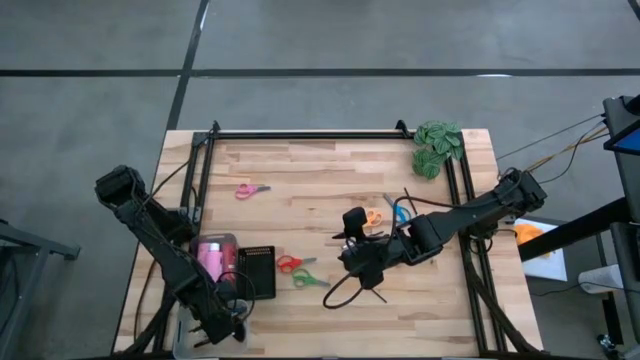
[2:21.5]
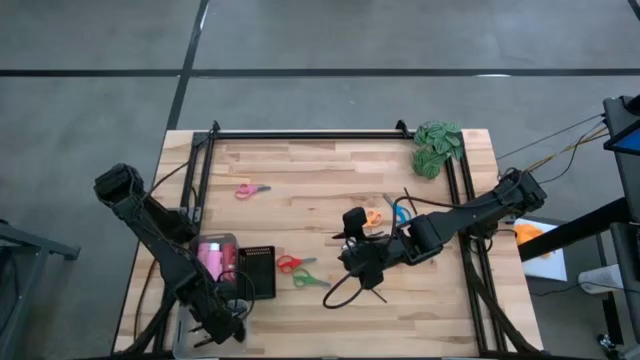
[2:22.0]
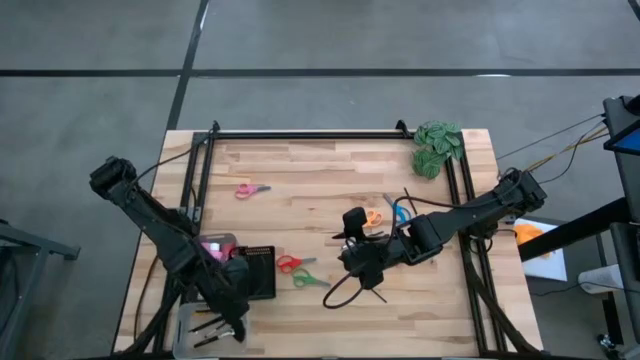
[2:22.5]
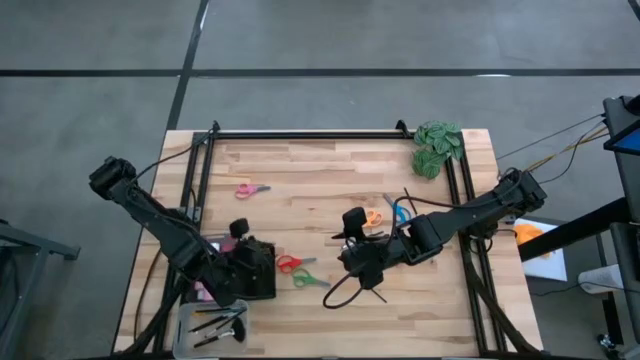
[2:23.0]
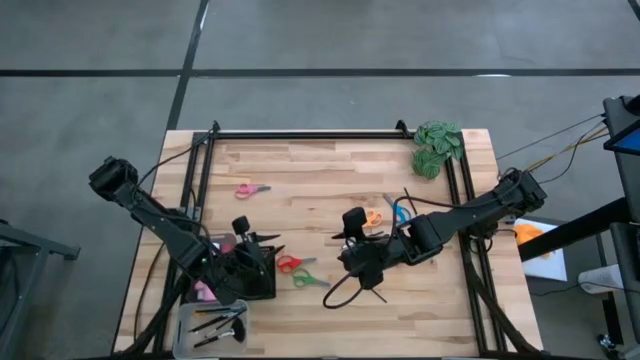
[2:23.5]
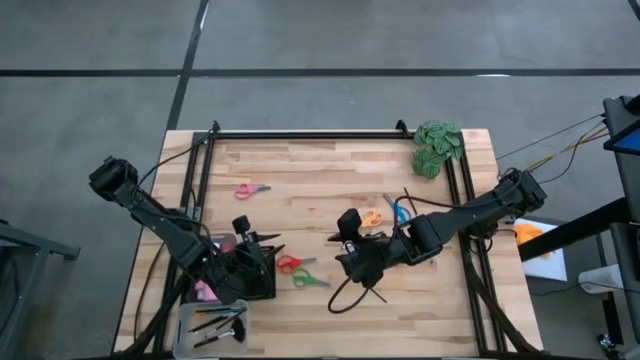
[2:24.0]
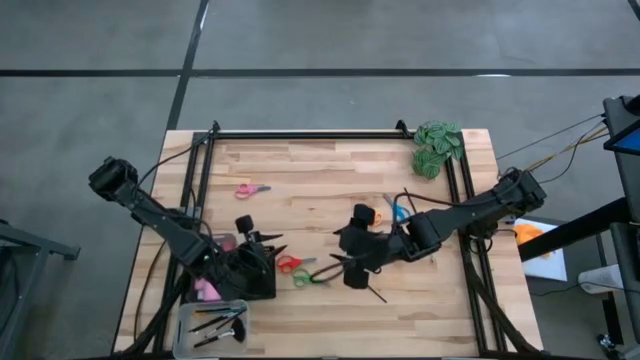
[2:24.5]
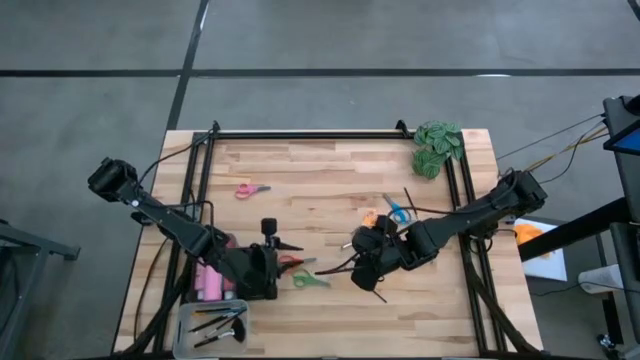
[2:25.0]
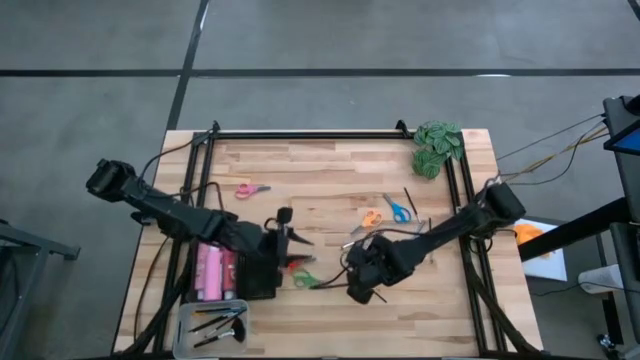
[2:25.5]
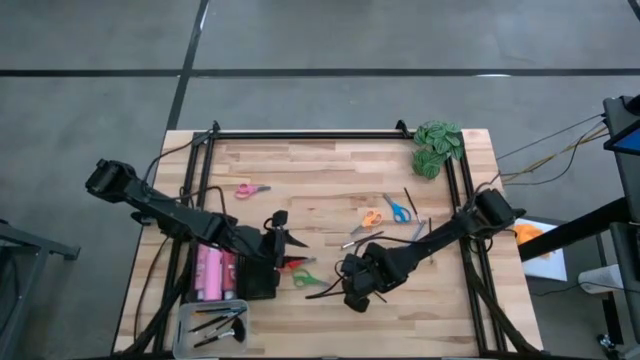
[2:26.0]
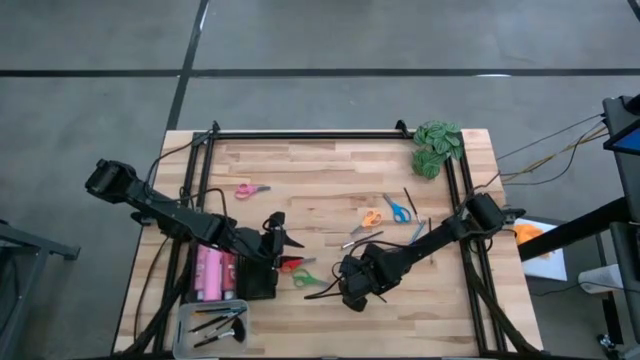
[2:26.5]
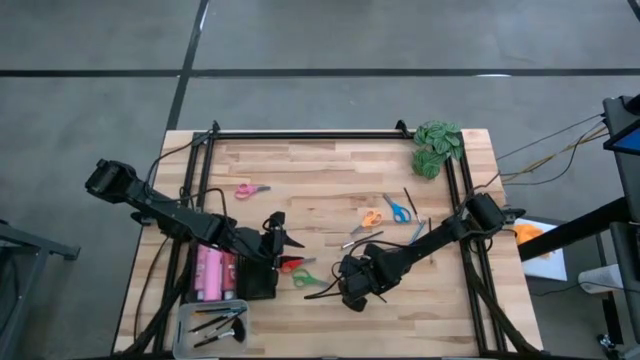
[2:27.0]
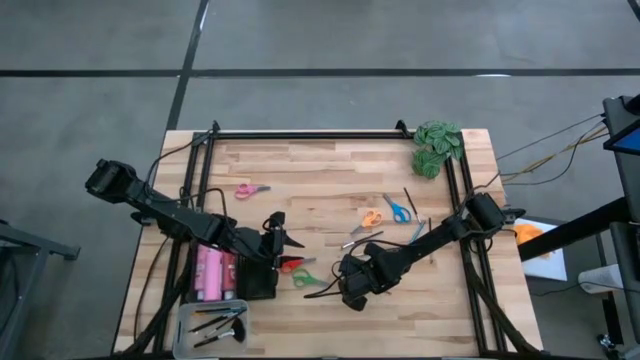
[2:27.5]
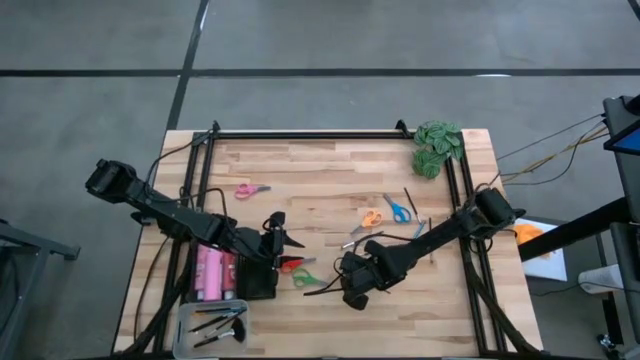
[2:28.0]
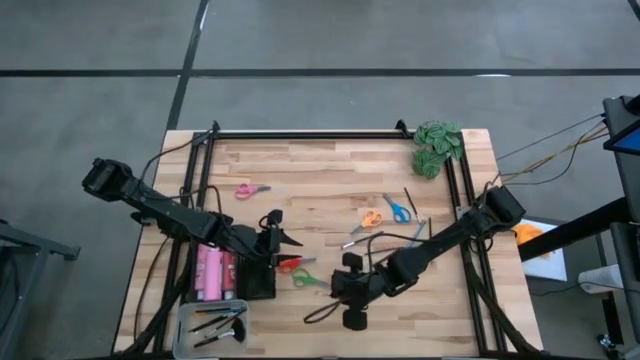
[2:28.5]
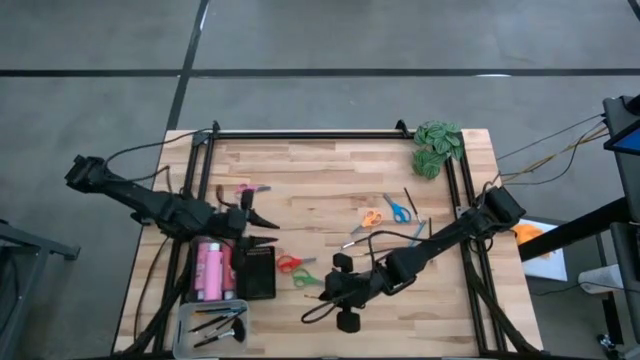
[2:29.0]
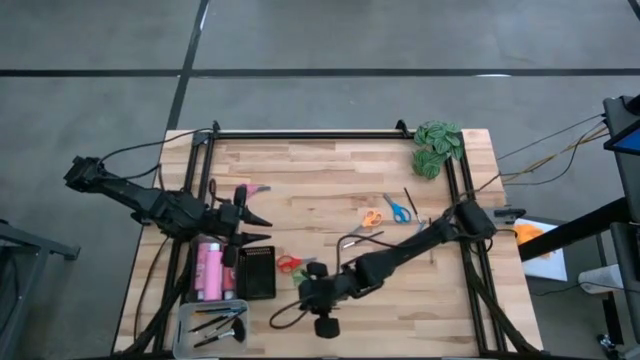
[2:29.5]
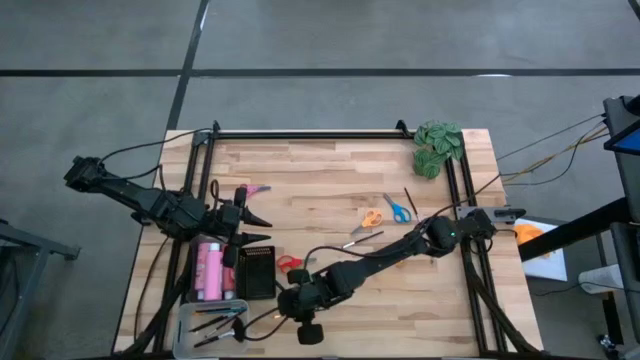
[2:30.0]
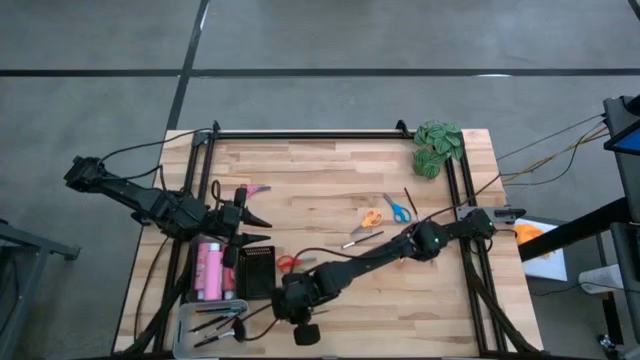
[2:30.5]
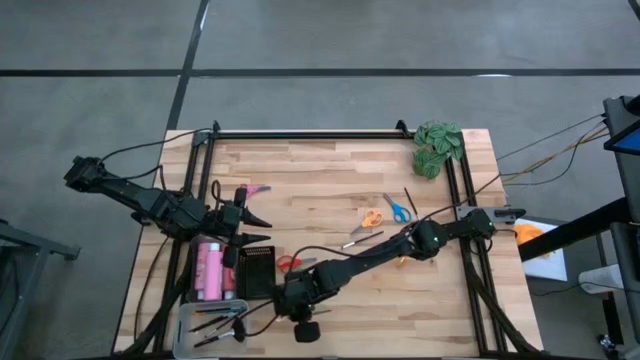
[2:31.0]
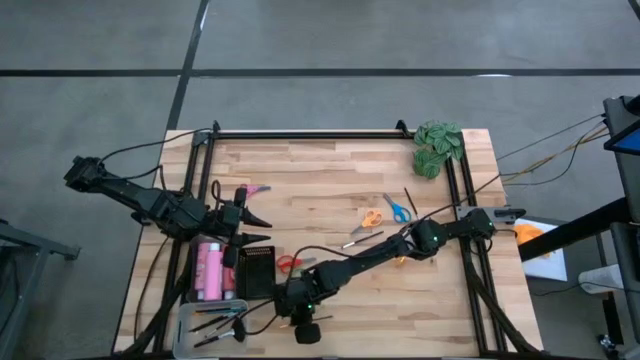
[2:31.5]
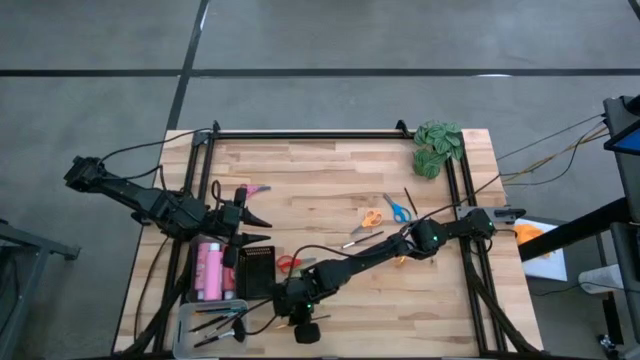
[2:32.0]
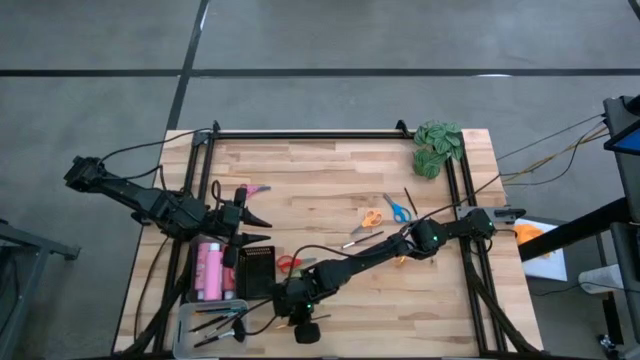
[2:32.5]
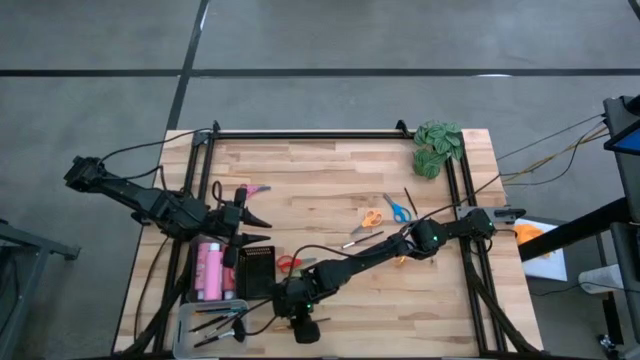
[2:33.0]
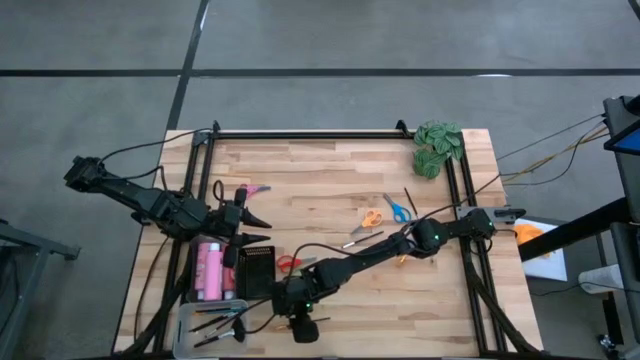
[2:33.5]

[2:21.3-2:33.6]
Task: Pick & Place Paint Supplies
Put the gold paint brush into the transparent bin

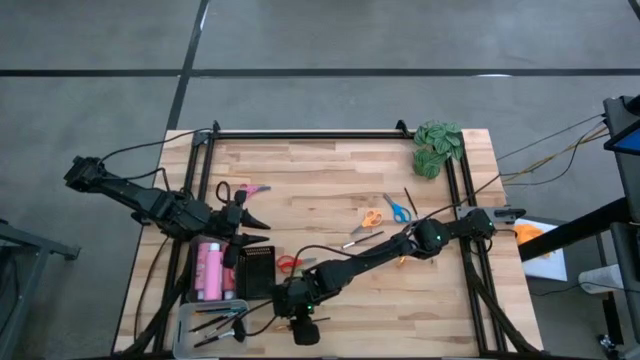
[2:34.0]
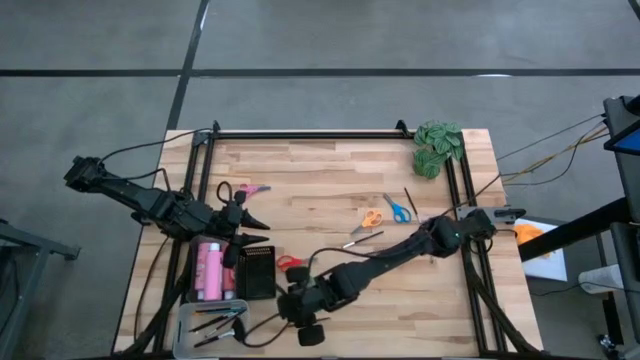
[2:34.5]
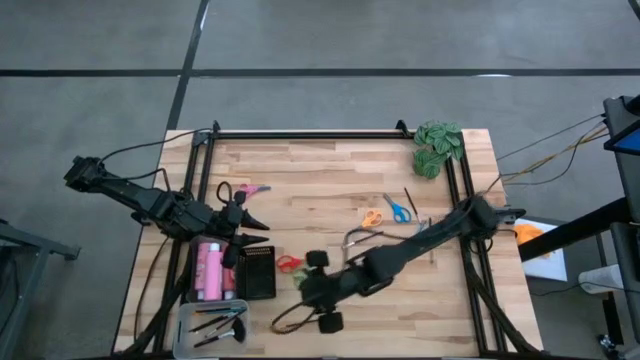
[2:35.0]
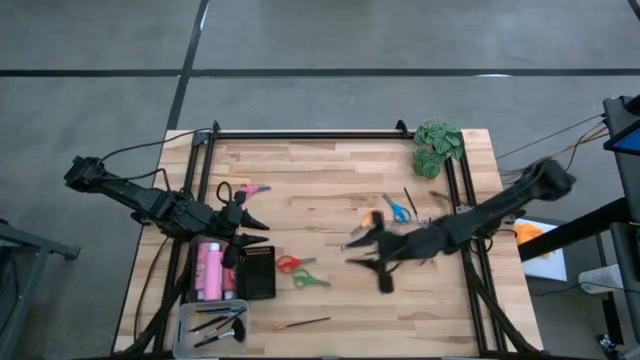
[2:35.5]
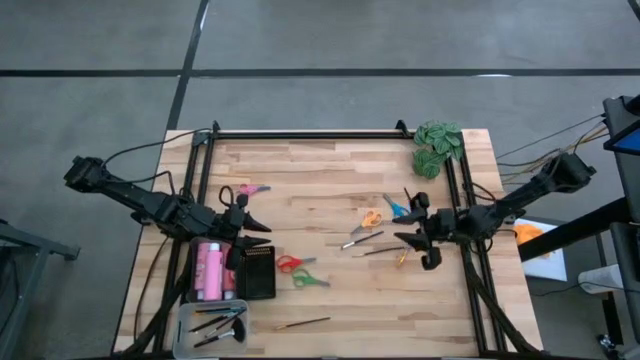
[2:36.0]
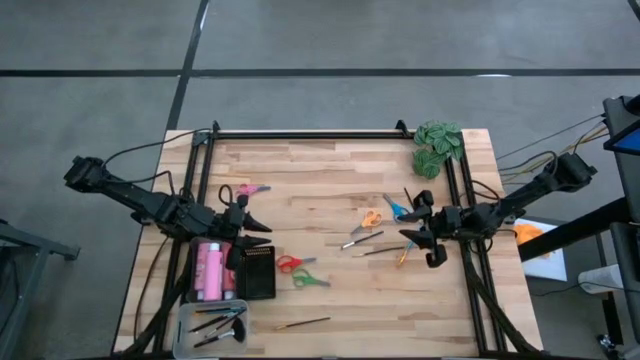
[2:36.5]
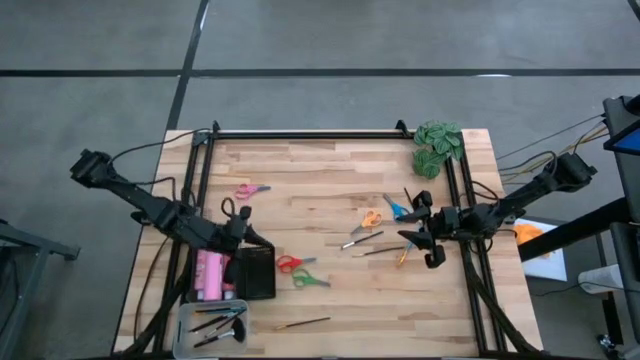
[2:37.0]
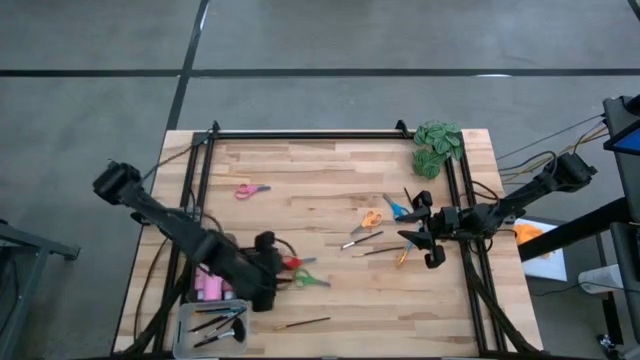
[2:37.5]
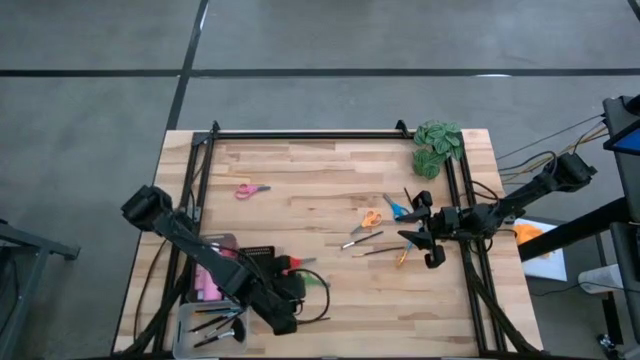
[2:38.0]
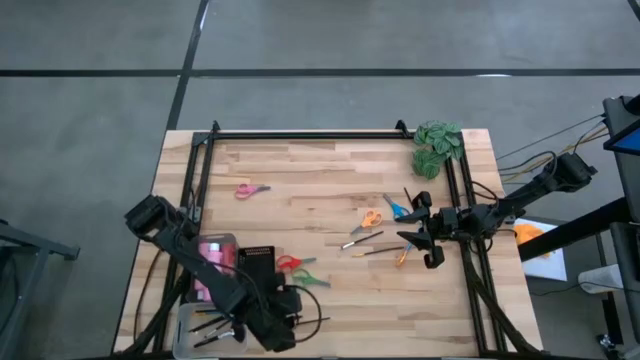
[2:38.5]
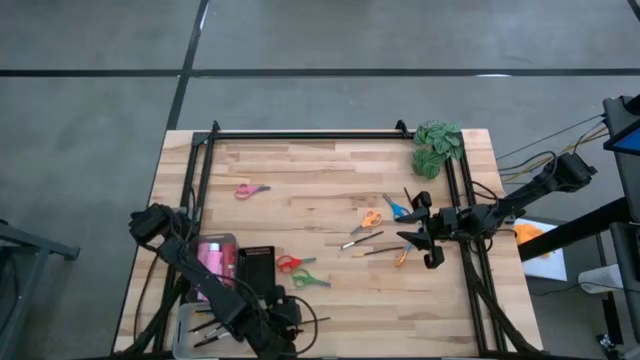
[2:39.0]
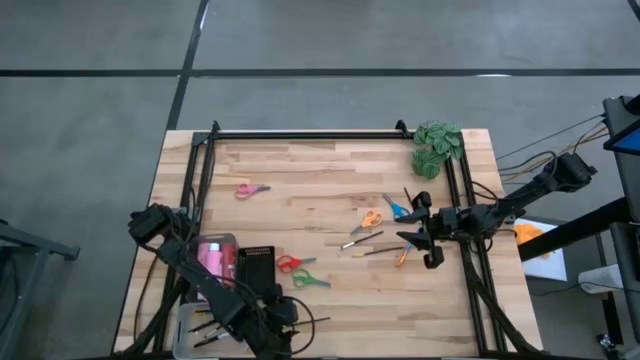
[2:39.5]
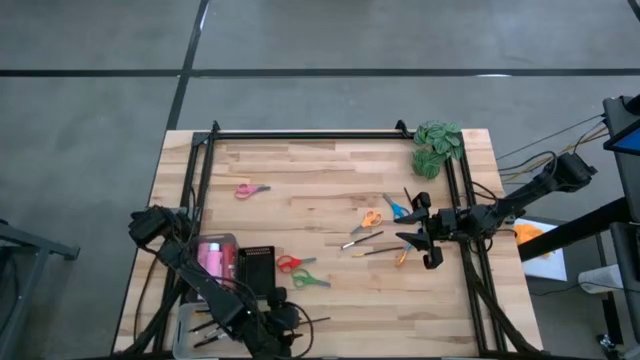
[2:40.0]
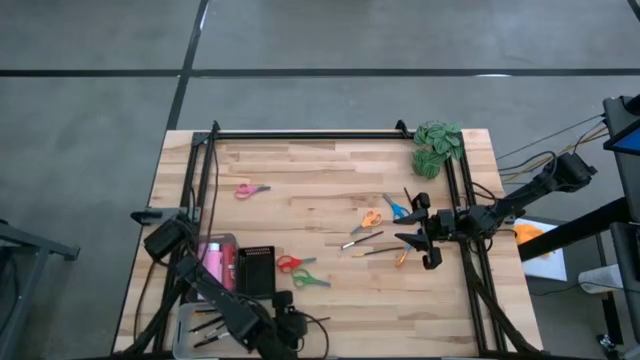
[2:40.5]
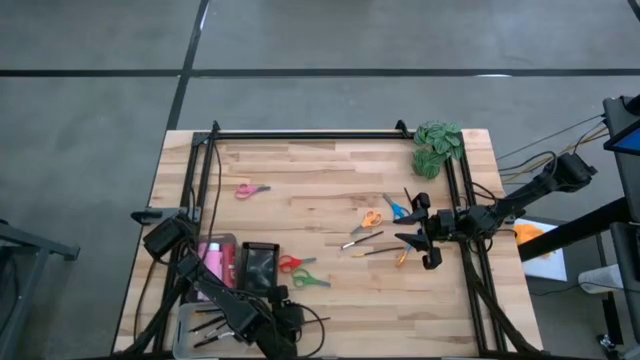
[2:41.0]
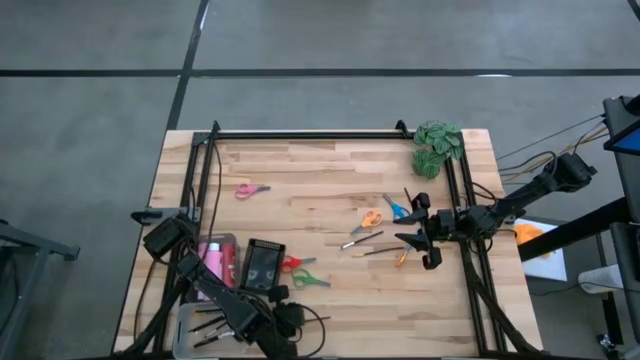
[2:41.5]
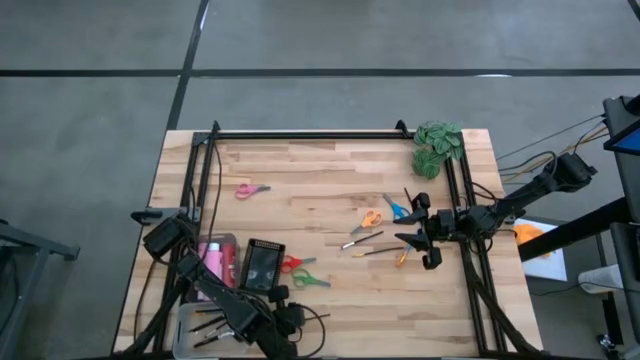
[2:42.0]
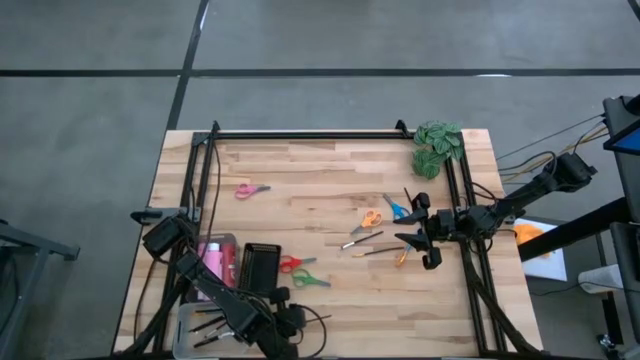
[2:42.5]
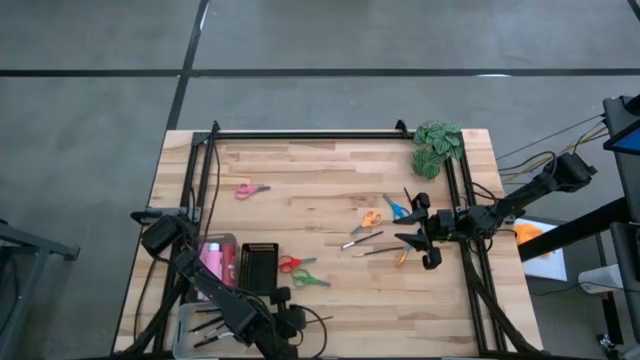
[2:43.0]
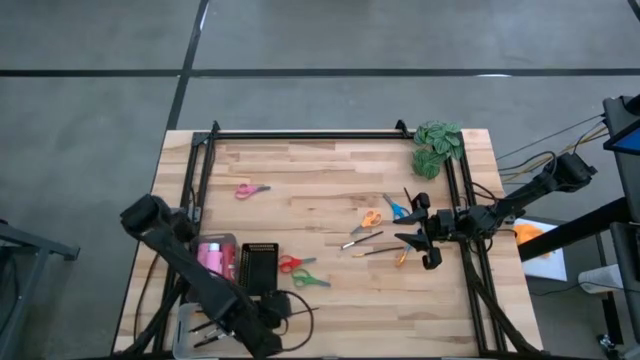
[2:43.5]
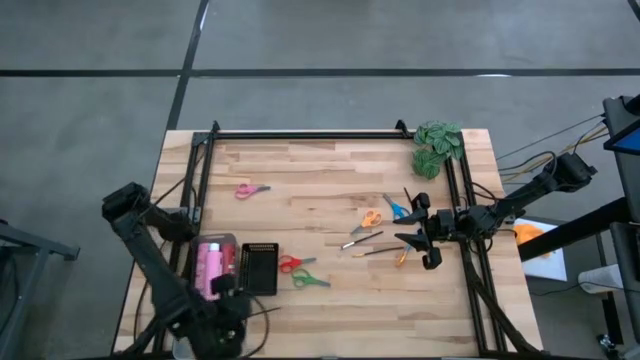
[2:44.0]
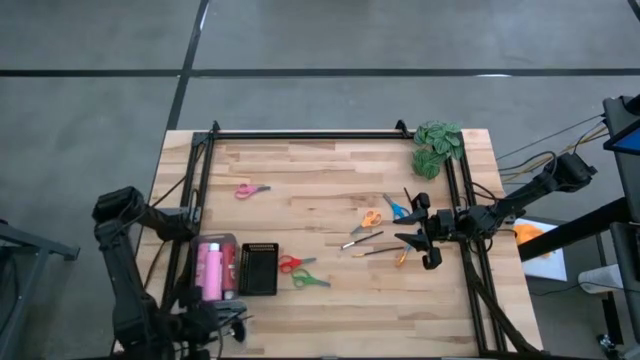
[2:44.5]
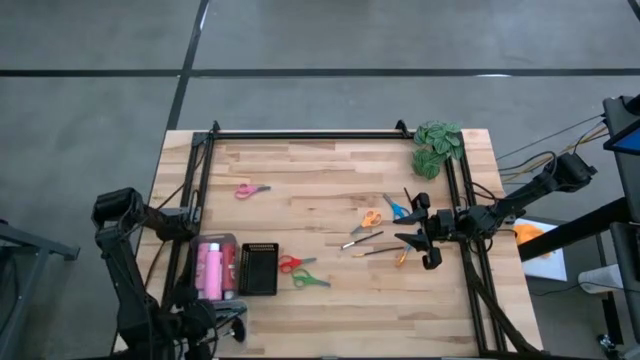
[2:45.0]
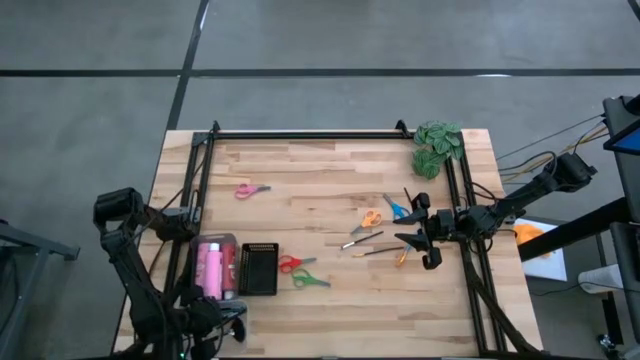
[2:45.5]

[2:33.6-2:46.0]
Put the gold paint brush into the transparent bin
